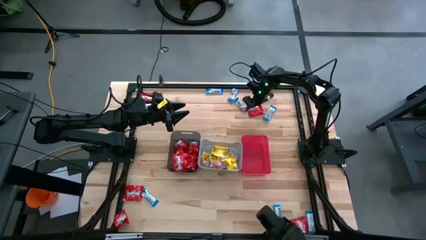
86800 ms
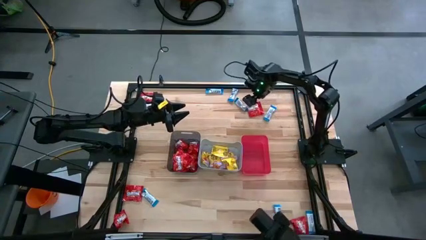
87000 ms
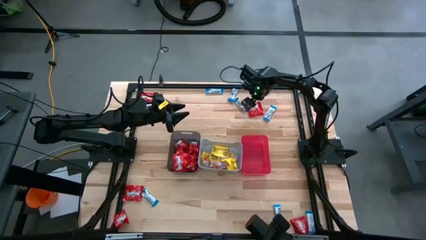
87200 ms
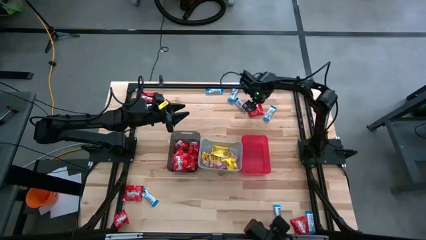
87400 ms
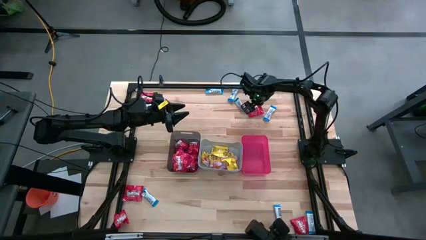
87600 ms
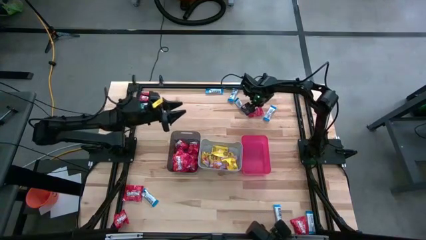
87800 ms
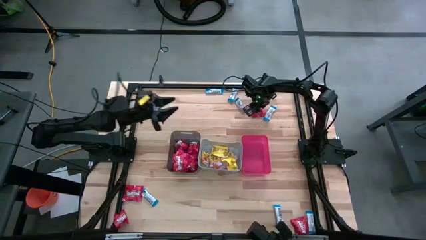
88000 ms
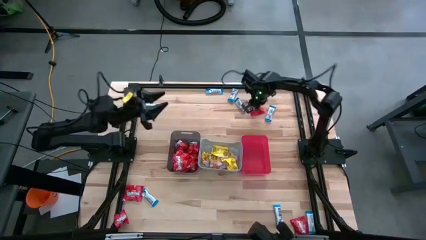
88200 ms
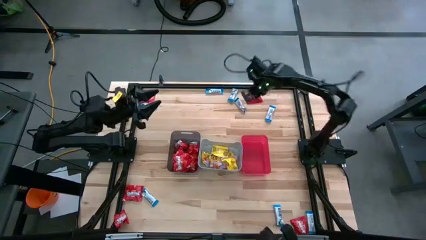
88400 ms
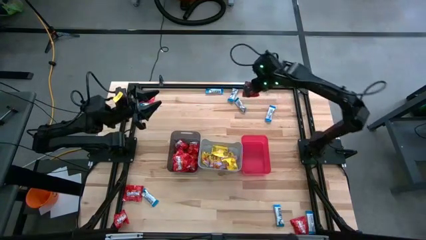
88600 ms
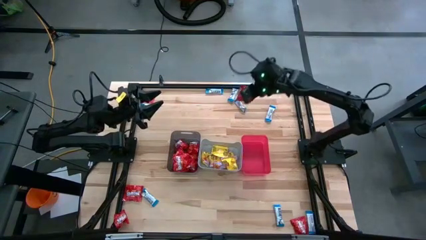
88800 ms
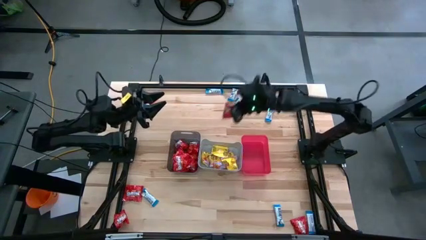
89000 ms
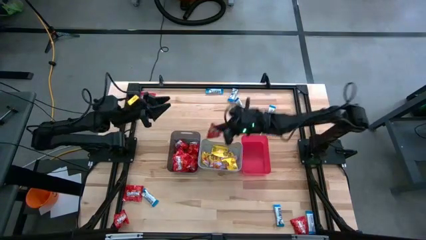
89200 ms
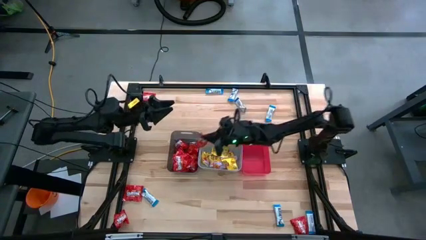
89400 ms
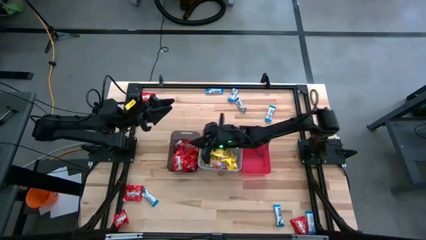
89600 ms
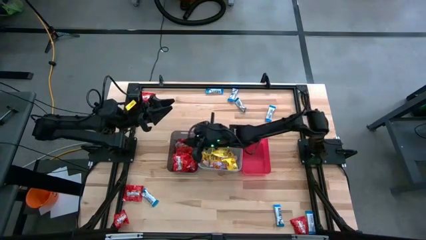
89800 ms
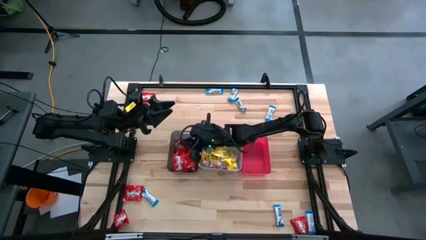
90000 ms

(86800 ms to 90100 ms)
Task: Sort candy
Put the red candy into the black bin

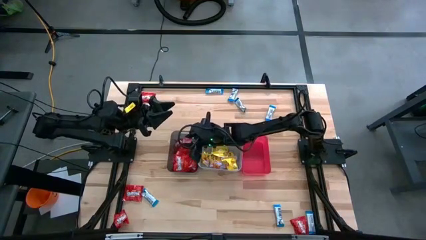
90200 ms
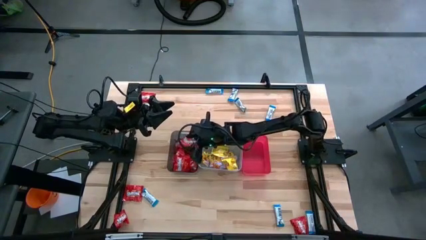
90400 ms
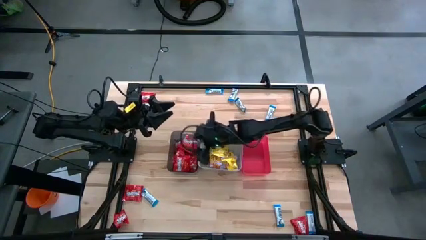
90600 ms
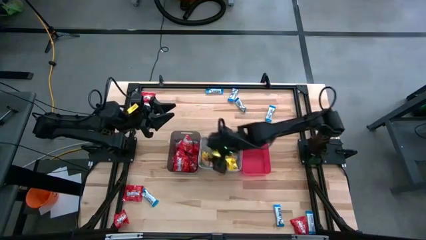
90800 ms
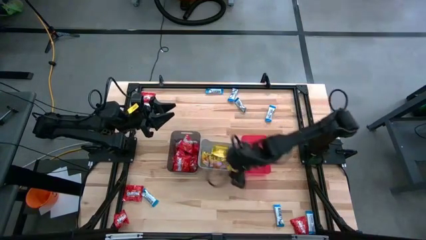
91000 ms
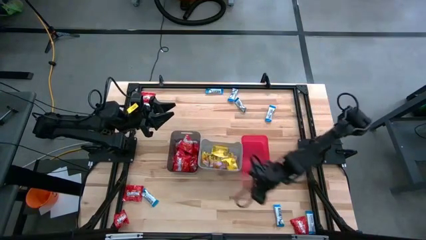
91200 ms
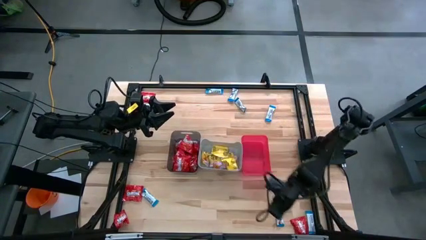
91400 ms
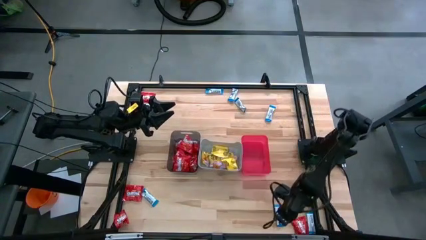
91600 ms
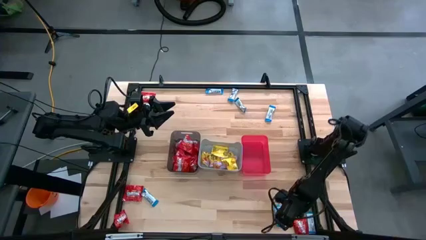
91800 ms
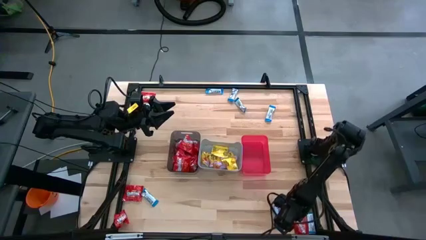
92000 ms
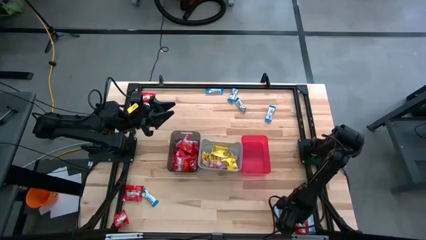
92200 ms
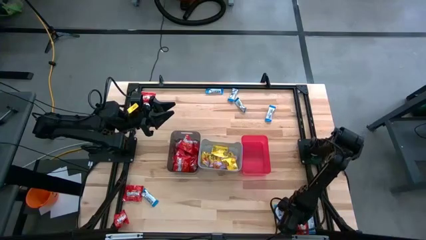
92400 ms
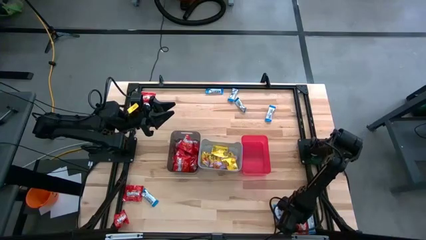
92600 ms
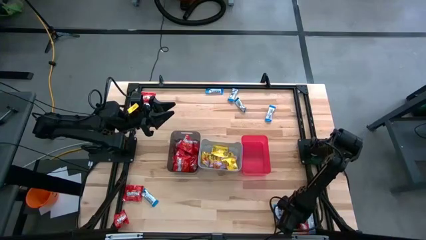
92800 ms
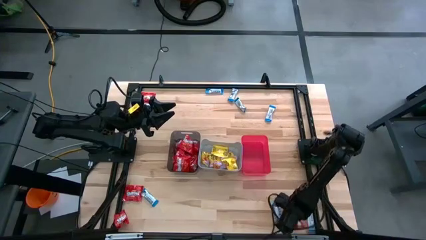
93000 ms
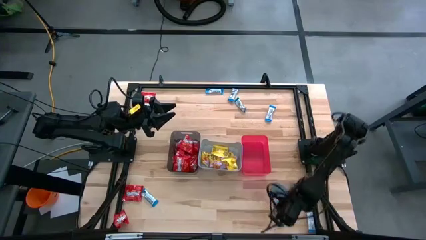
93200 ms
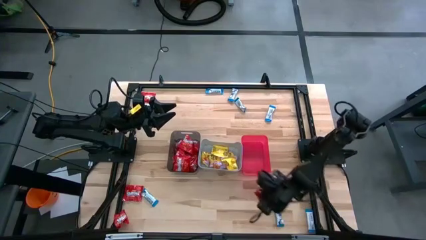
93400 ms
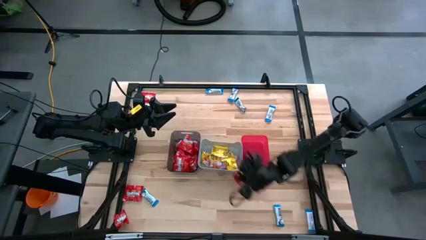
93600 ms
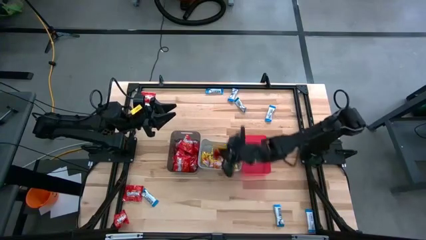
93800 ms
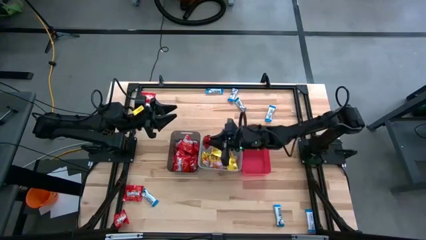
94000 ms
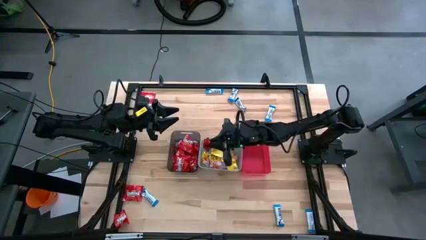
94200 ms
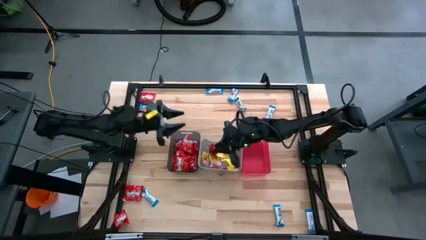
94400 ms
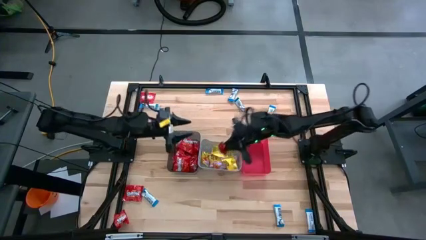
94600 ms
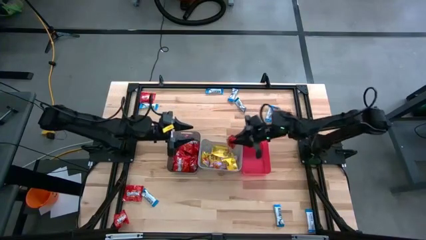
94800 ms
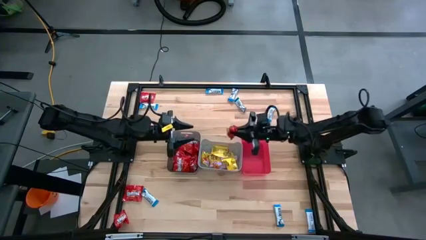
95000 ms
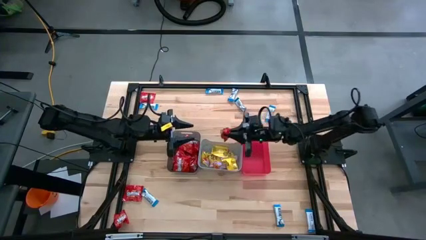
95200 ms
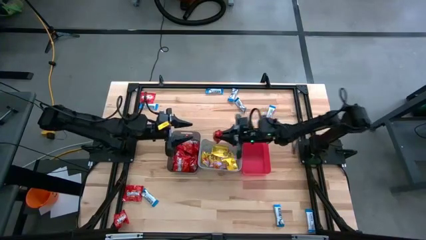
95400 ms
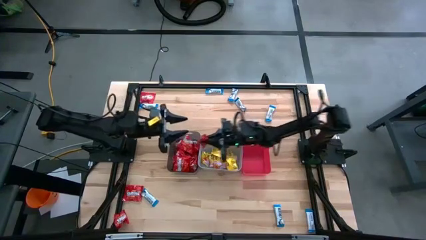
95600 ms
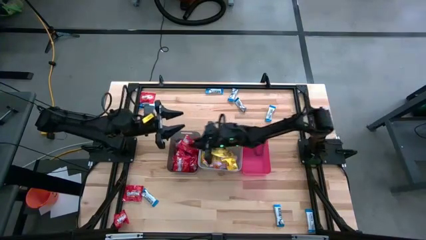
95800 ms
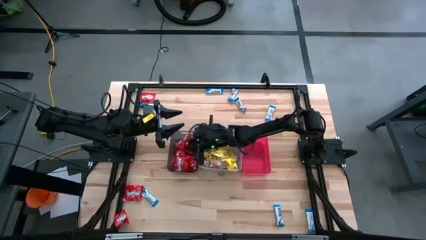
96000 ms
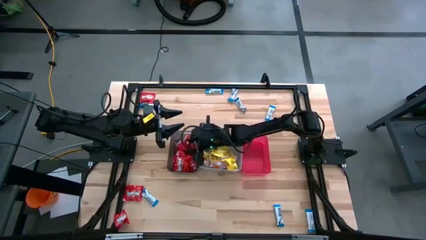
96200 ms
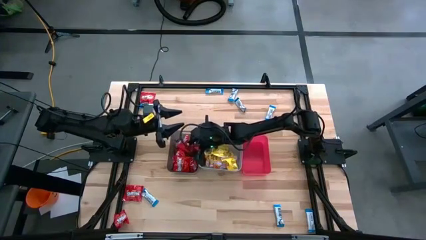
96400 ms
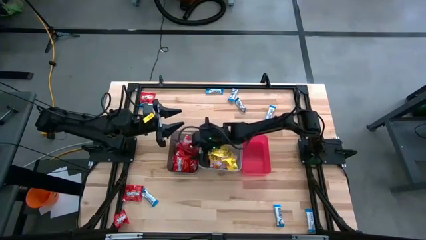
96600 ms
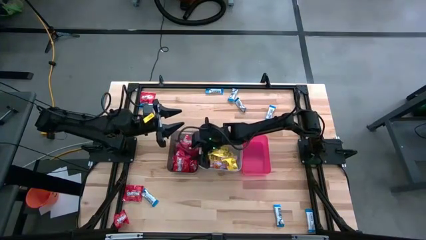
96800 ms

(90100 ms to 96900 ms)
Put the red candy into the black bin

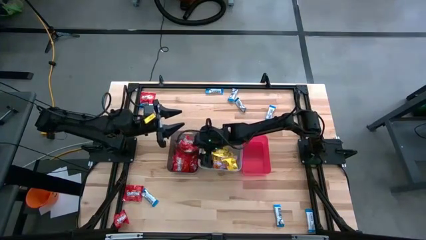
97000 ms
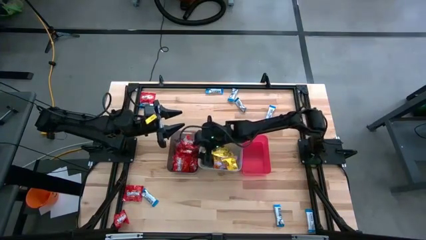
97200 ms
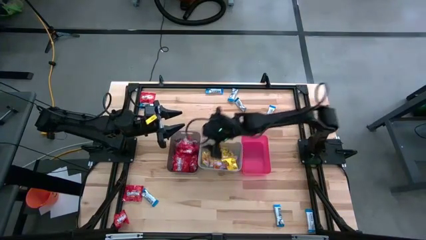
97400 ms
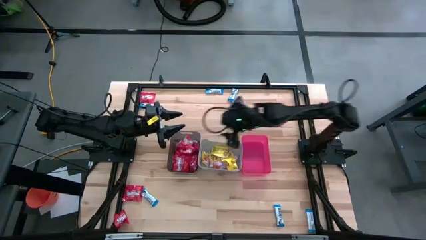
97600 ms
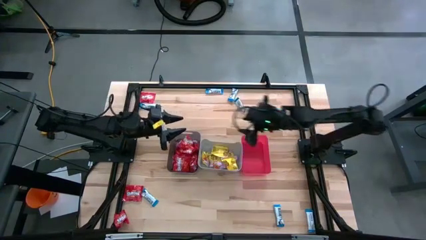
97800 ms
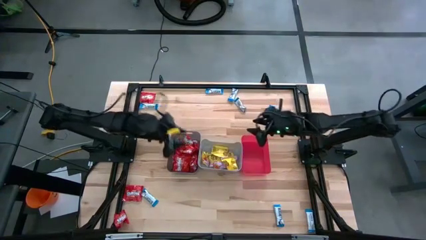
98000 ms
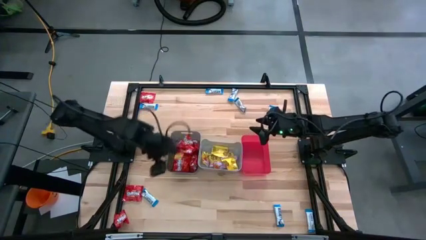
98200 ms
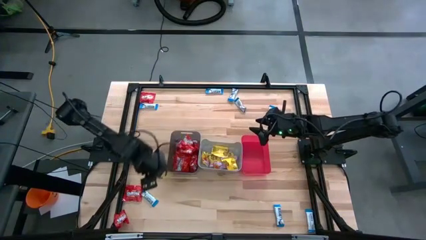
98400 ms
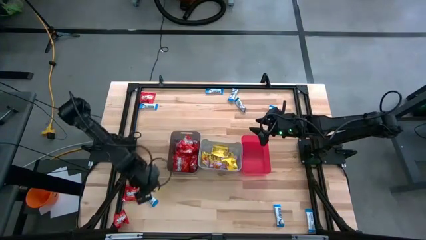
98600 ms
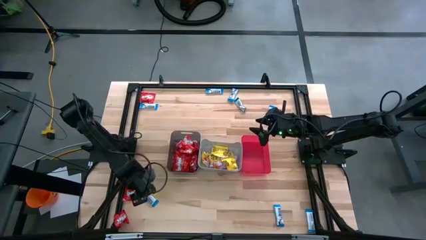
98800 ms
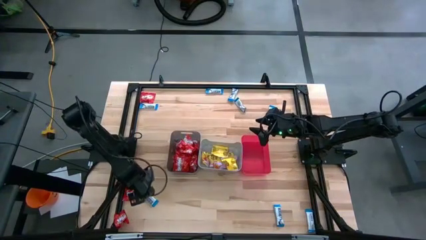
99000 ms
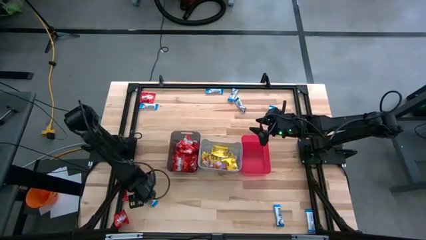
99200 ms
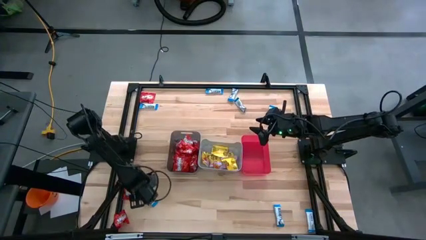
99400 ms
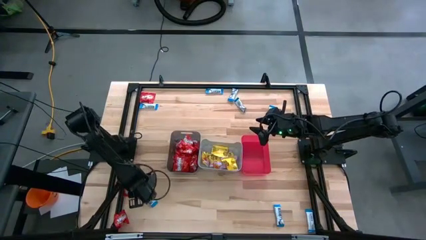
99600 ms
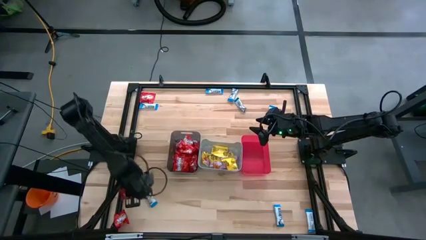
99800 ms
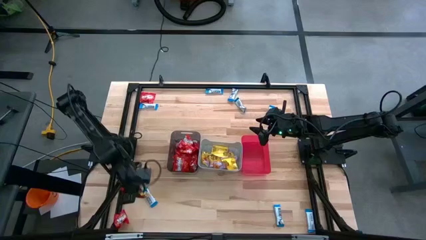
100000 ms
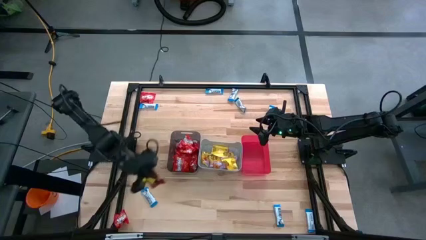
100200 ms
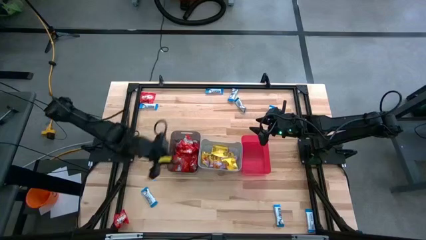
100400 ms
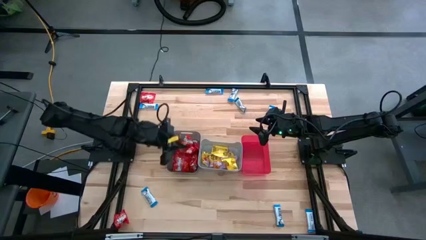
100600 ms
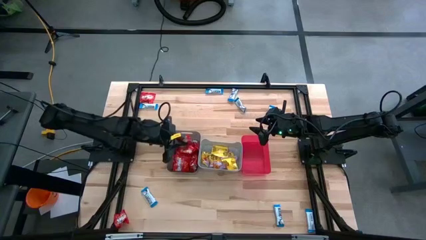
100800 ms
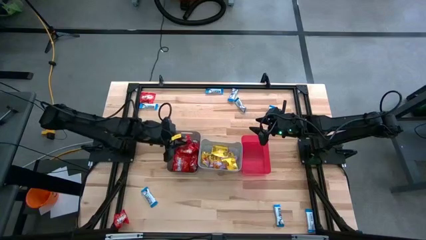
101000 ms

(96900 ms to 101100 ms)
Put the red candy into the black bin

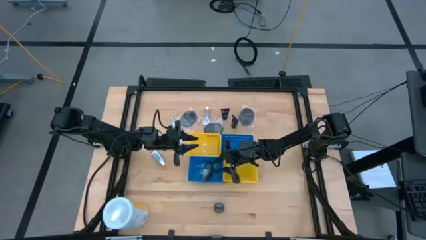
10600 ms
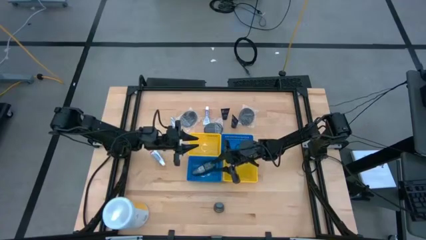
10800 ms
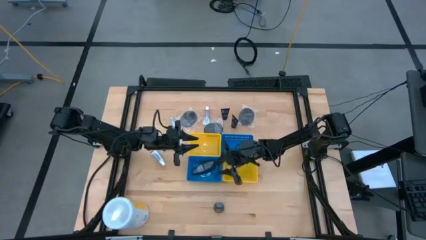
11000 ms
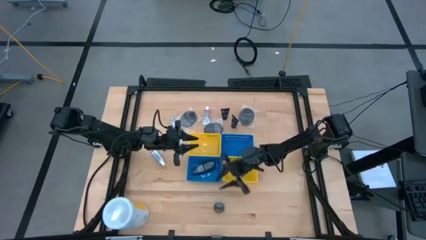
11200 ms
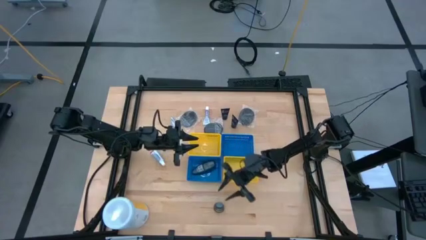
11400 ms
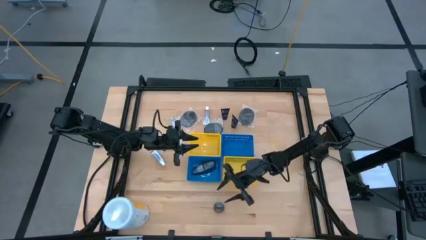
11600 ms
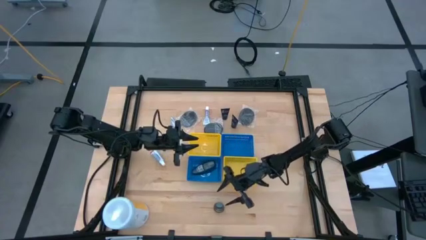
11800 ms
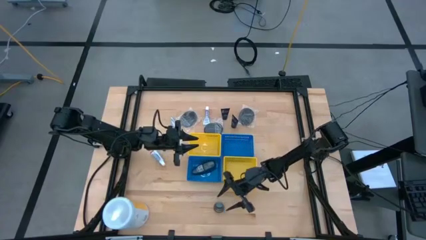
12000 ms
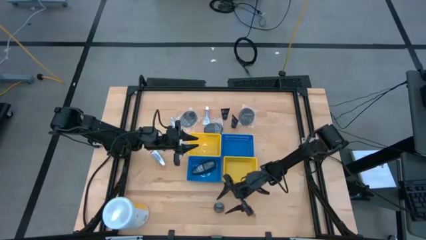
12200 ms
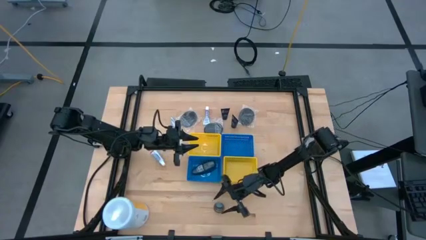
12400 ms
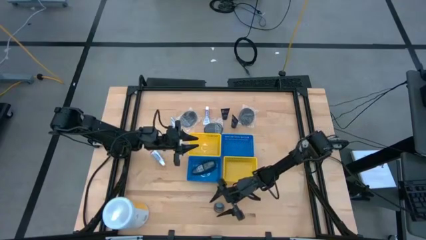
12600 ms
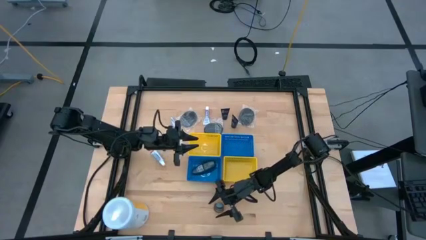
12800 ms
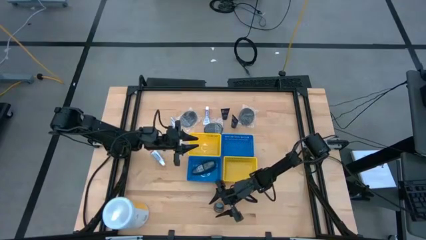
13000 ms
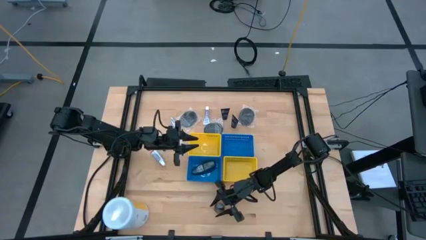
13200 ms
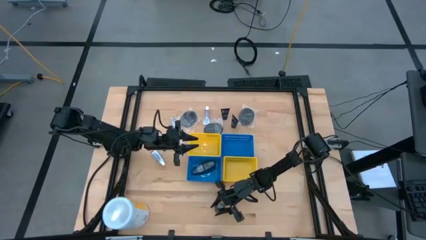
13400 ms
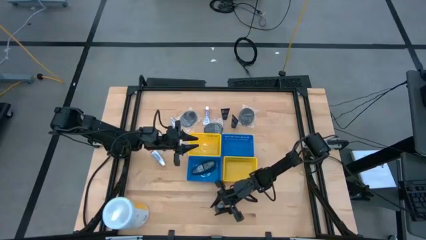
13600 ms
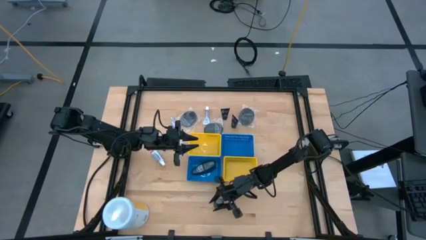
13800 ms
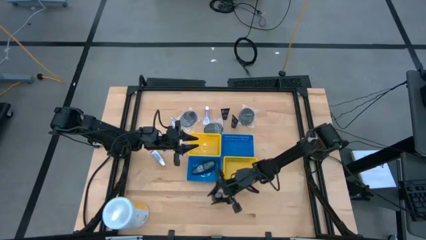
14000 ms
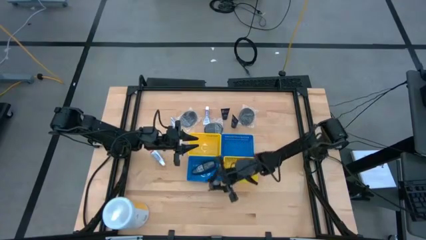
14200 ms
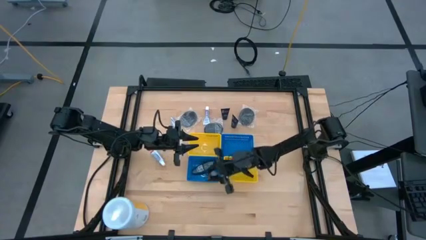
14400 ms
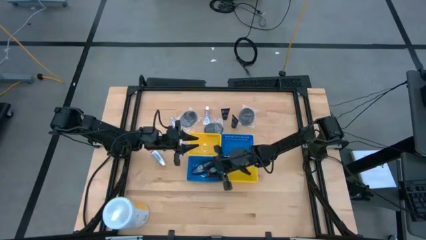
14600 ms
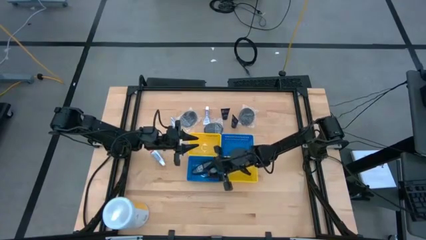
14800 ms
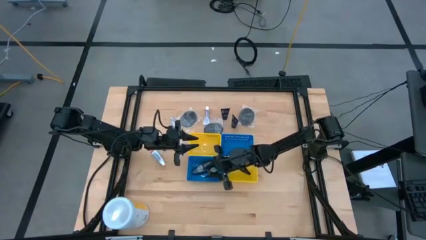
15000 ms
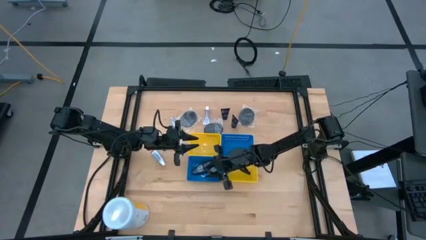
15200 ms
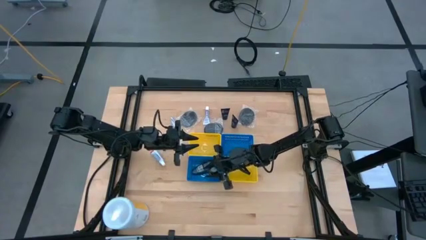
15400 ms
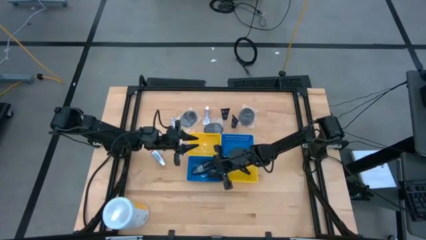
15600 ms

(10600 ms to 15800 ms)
Task: Pick & Place Travel size toiletries
Put the gray deodorant into the left blue bin
